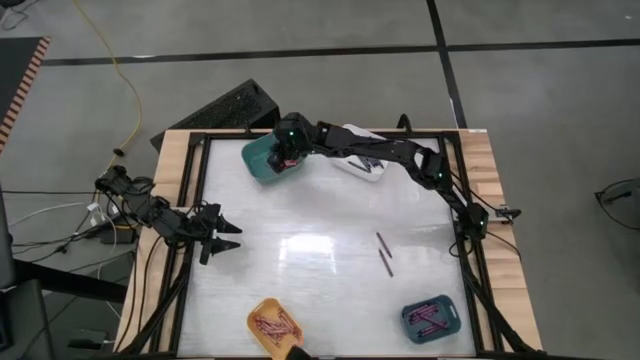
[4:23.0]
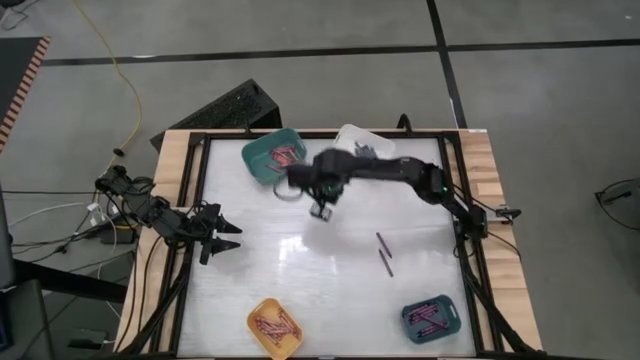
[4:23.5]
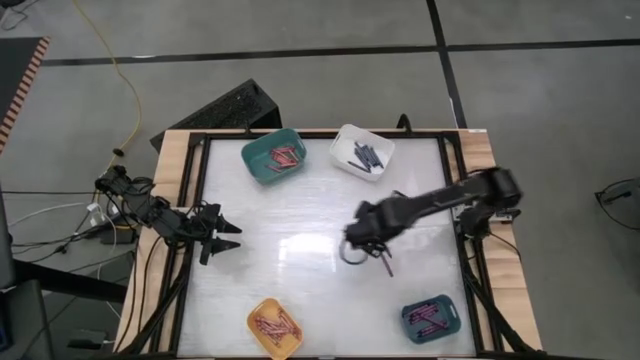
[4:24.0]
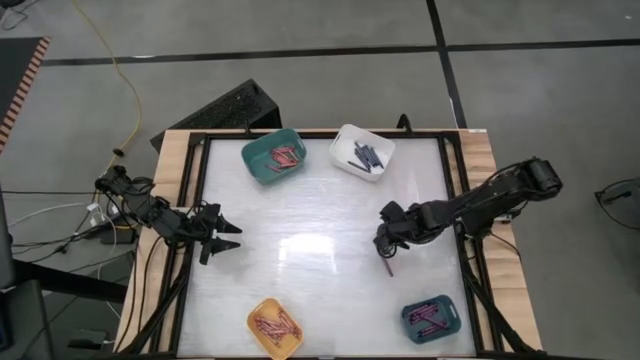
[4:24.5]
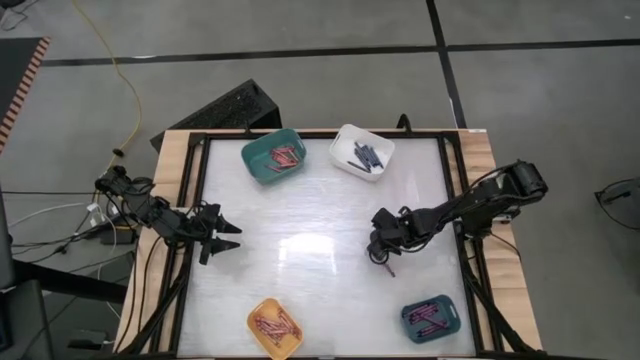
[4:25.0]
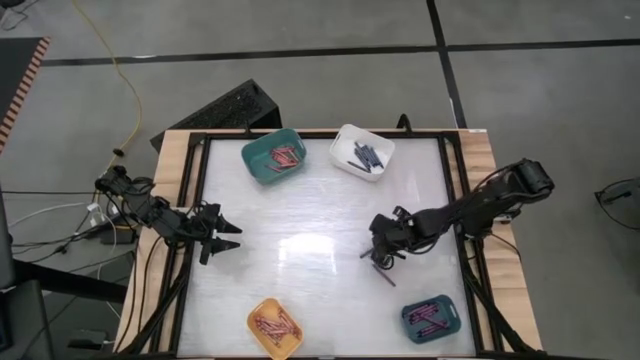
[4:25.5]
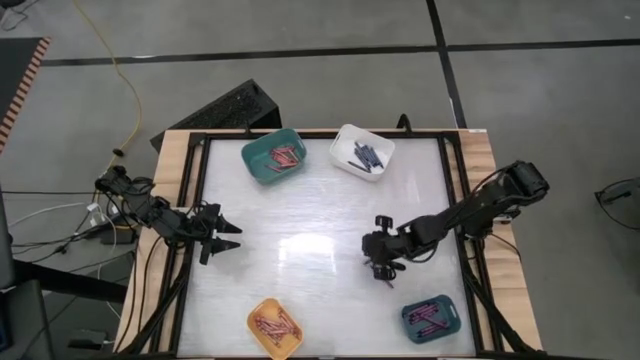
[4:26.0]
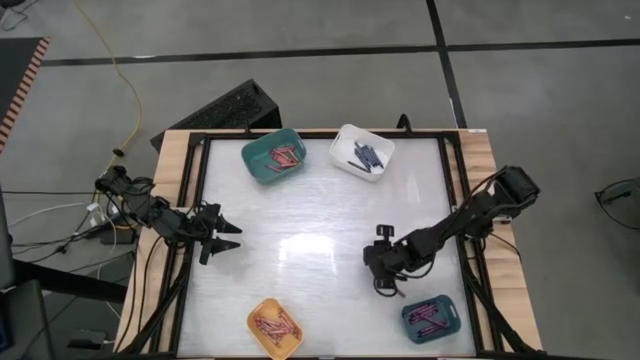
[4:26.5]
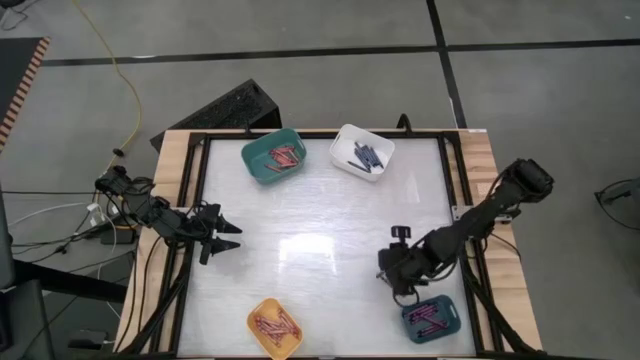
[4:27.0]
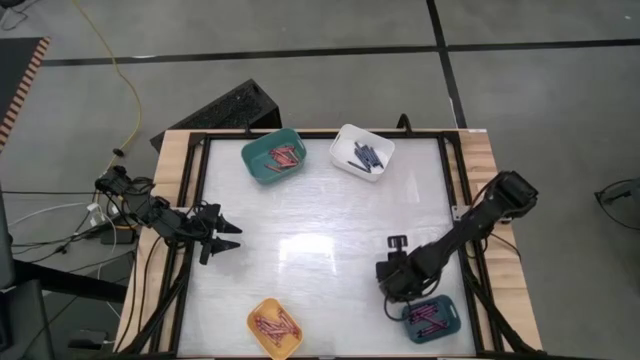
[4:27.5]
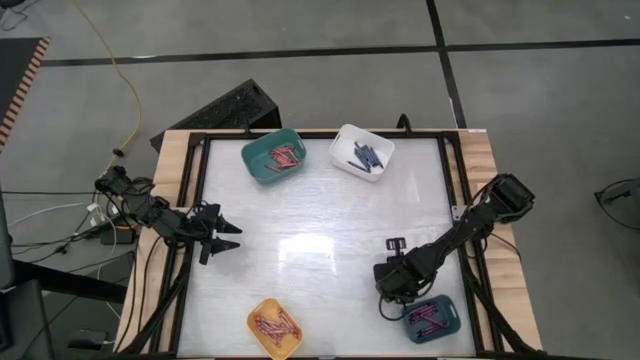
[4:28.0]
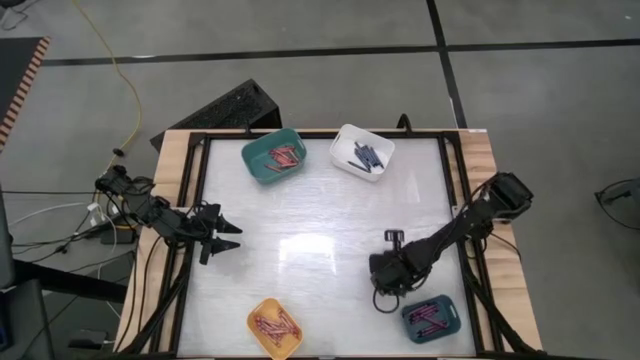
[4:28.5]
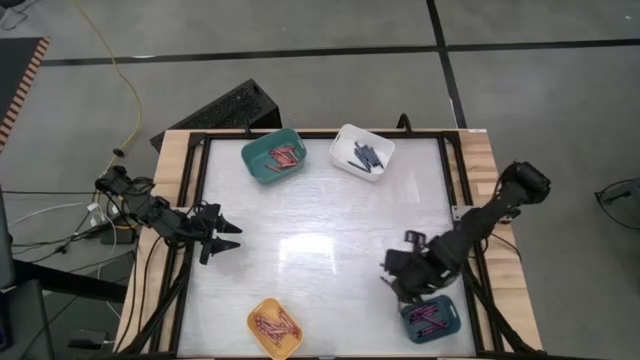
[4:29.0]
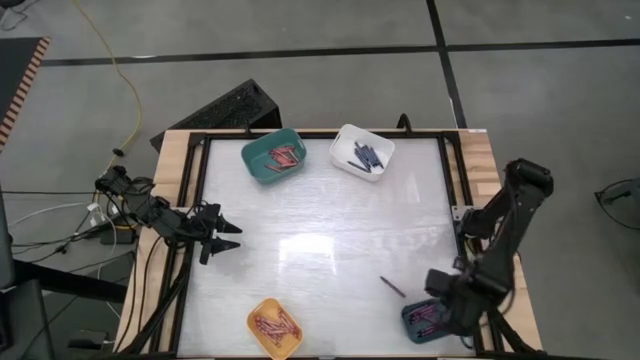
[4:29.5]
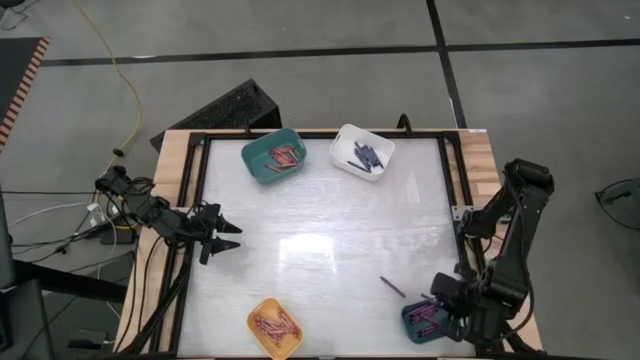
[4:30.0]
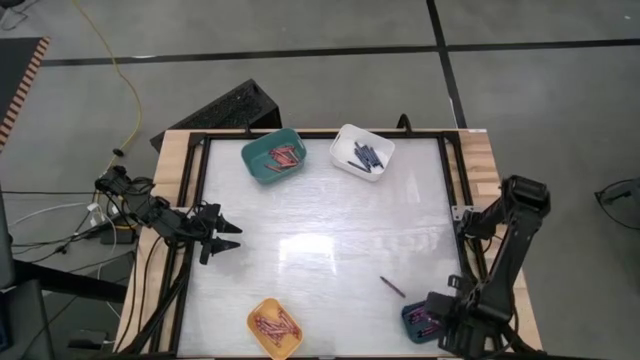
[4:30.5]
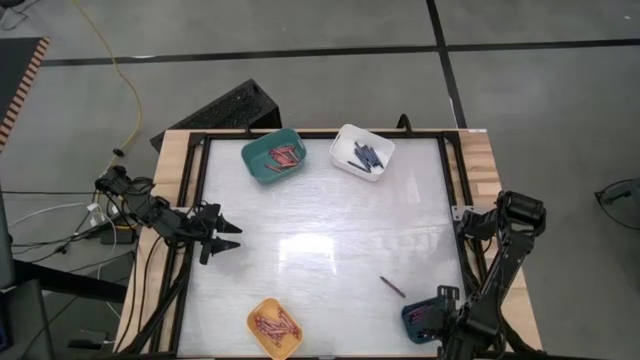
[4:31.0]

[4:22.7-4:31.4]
Task: Sort crayons
Put the purple crayon into the blue bin

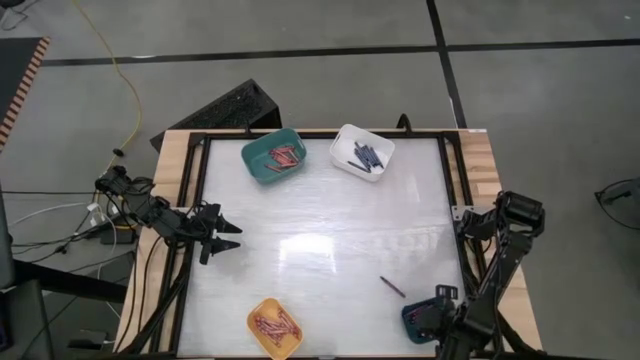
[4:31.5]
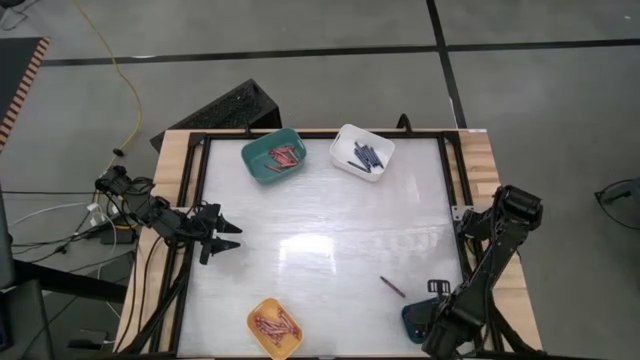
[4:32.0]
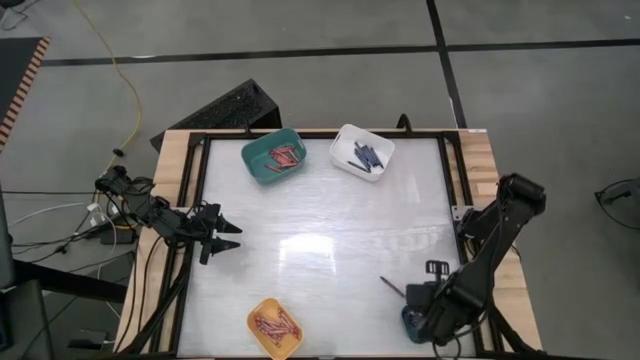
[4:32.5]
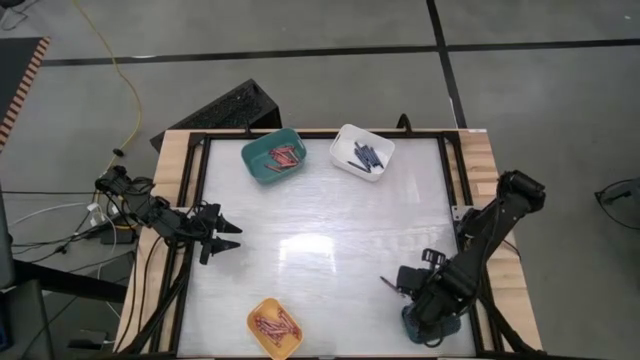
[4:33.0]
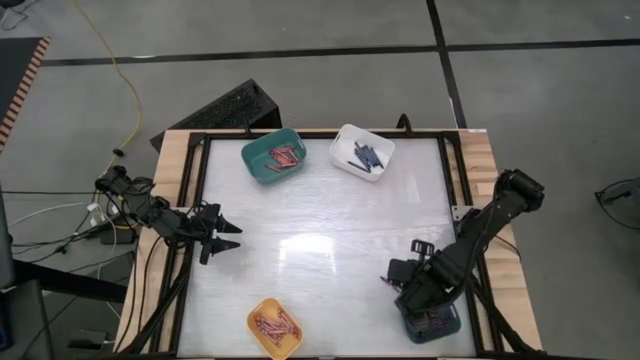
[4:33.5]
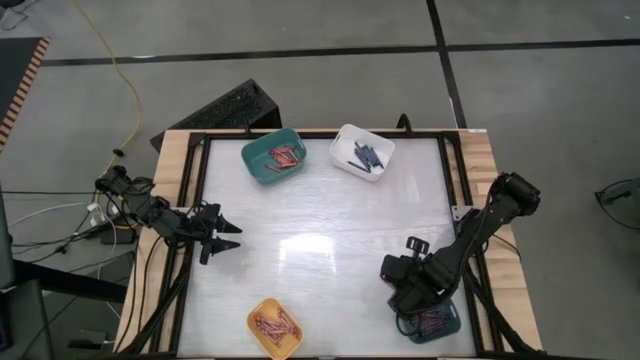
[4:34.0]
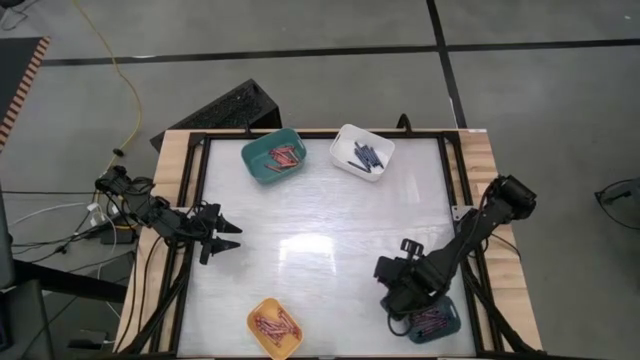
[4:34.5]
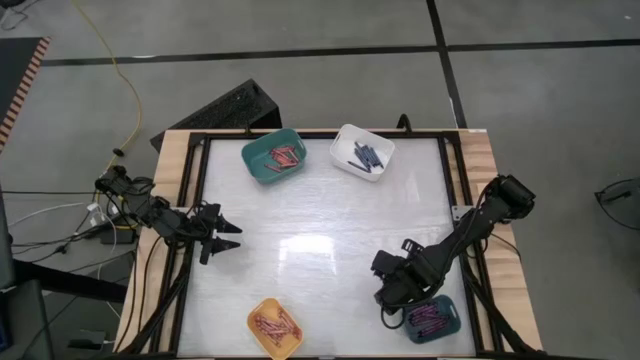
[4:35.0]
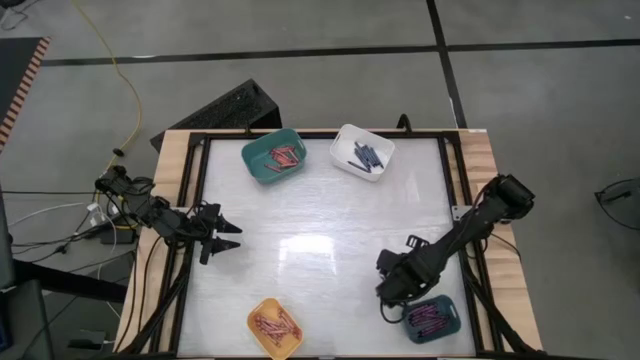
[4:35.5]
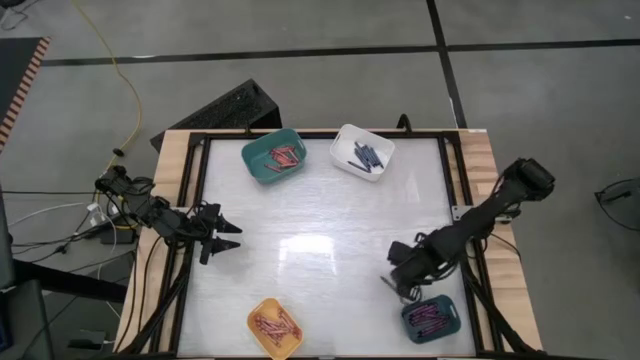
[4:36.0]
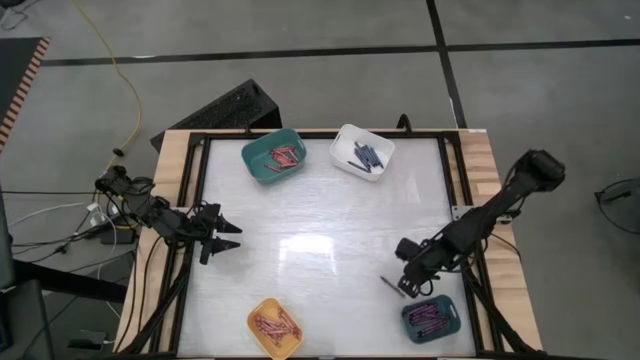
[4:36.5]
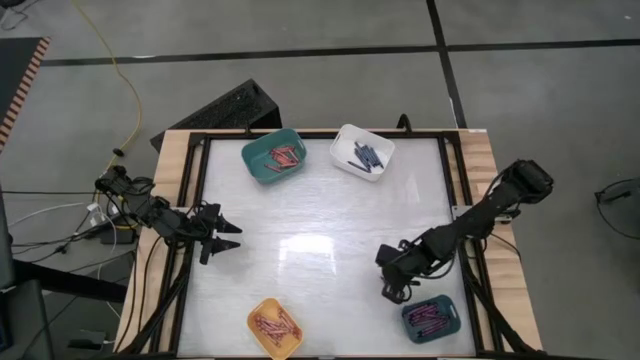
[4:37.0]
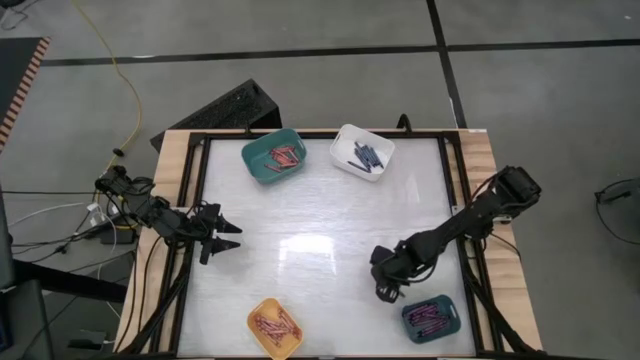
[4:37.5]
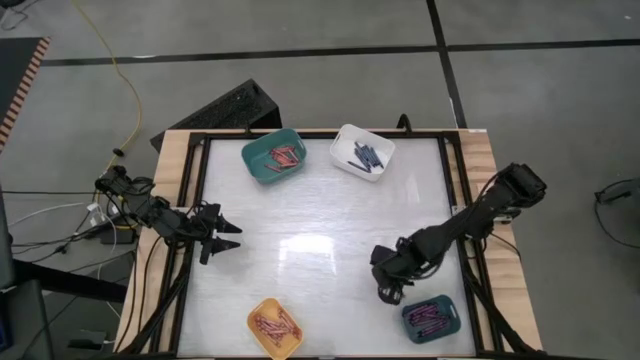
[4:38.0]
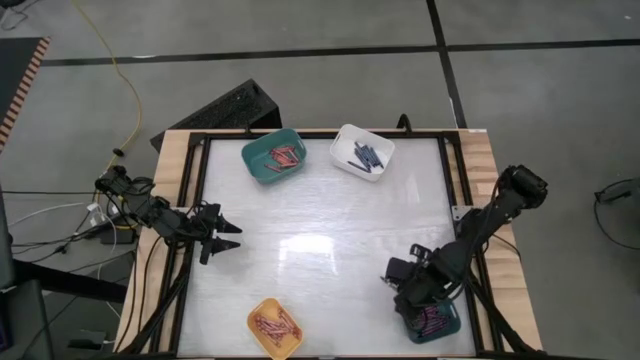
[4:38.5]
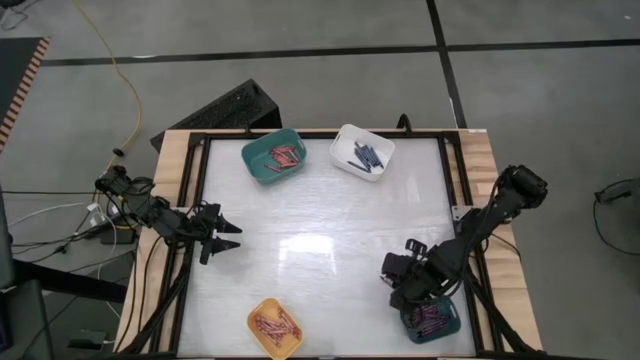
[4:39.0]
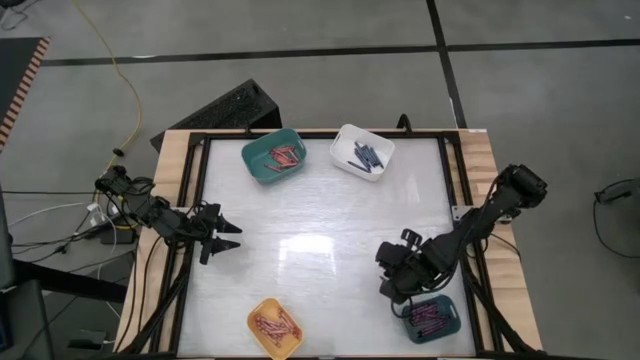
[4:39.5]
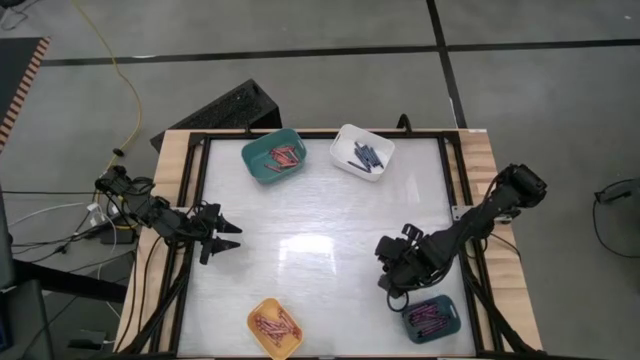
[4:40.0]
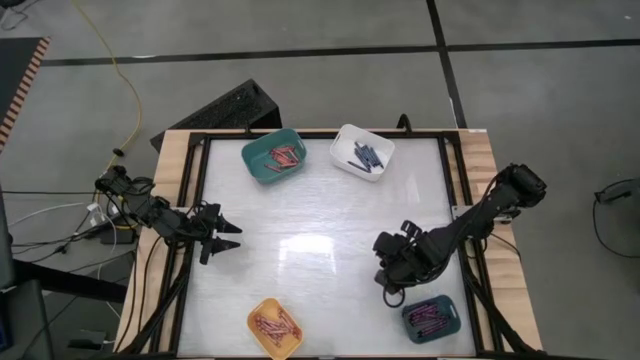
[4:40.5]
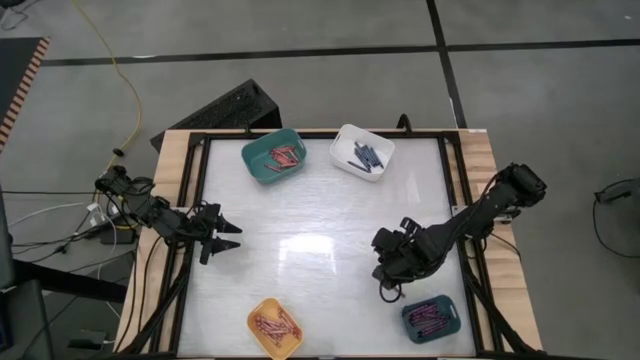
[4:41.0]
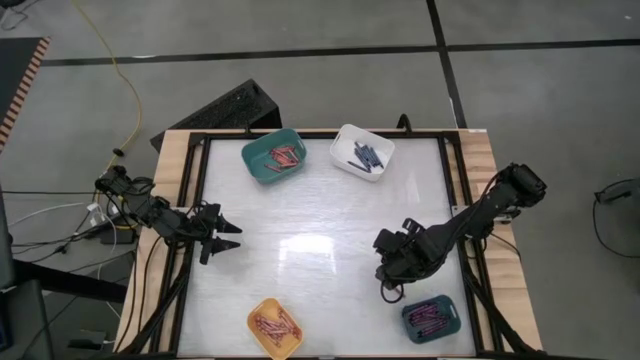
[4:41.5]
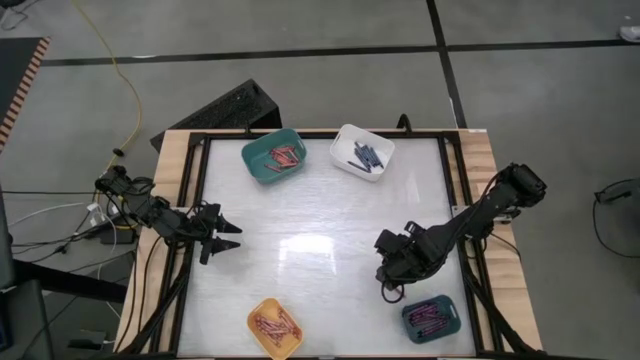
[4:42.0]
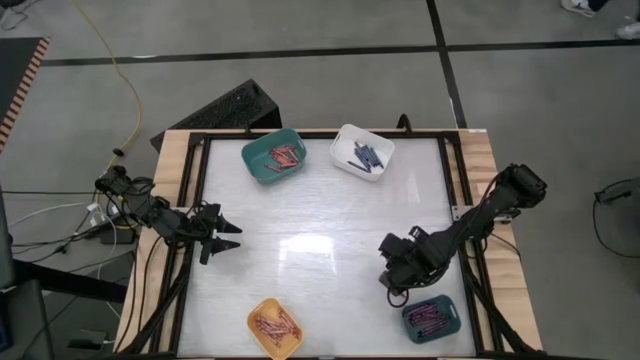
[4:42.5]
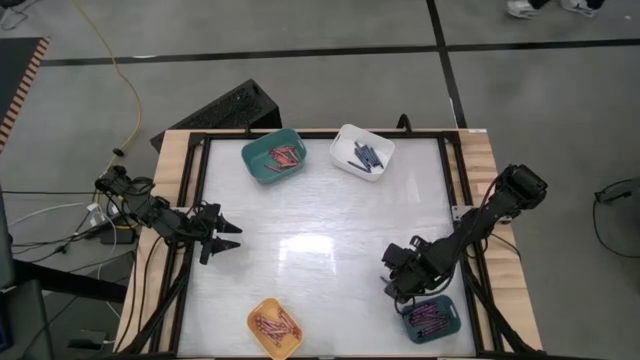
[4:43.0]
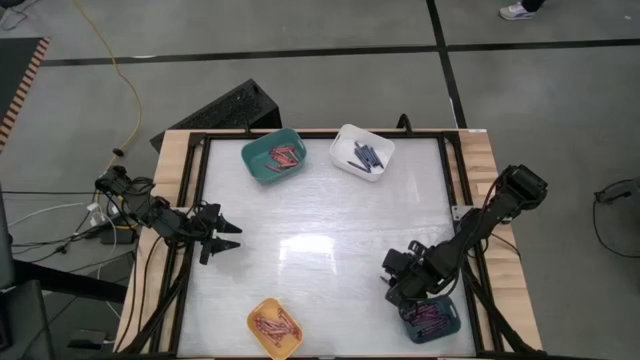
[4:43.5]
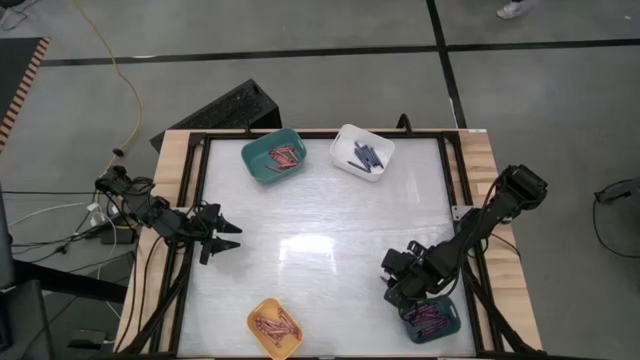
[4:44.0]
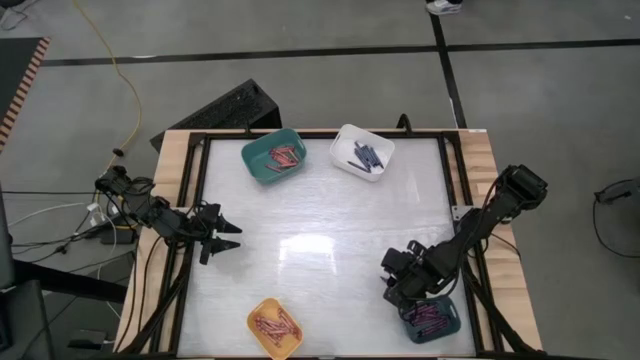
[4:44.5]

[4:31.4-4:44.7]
Put the purple crayon into the blue bin
